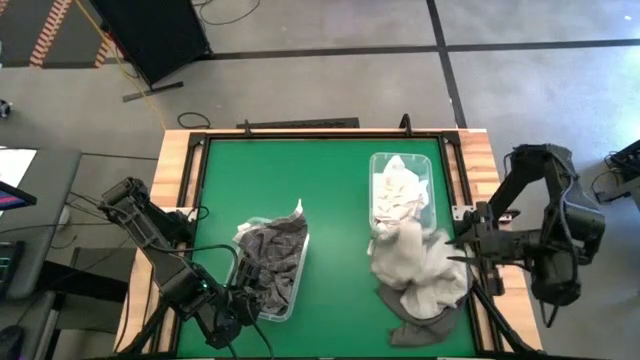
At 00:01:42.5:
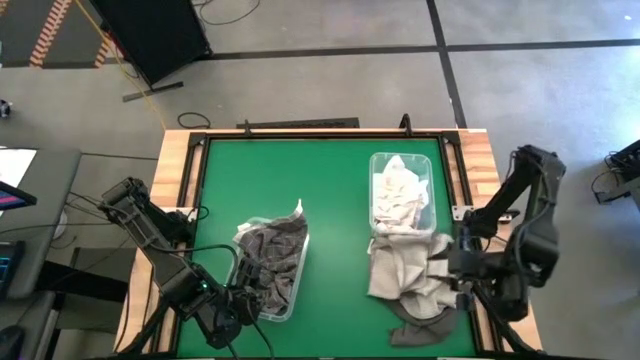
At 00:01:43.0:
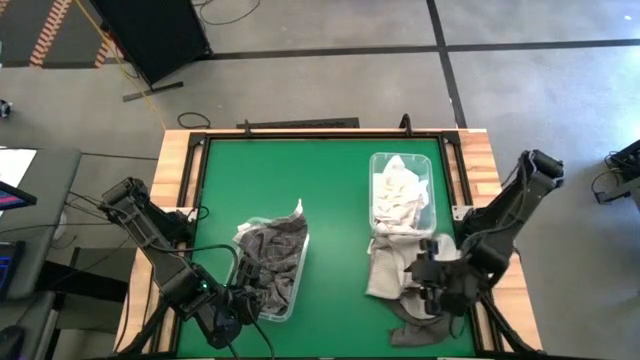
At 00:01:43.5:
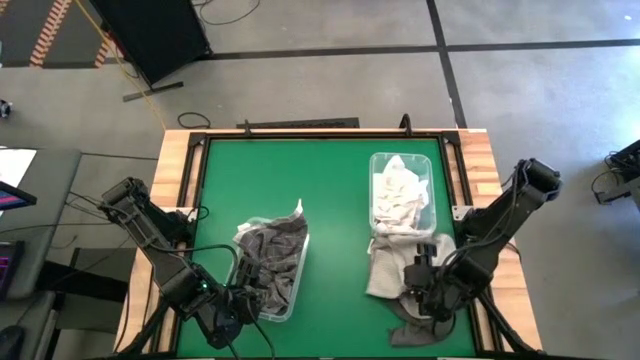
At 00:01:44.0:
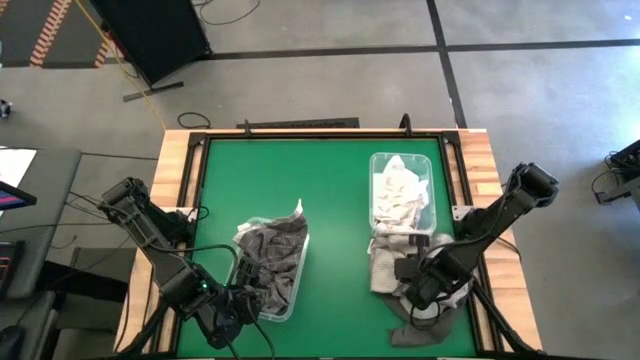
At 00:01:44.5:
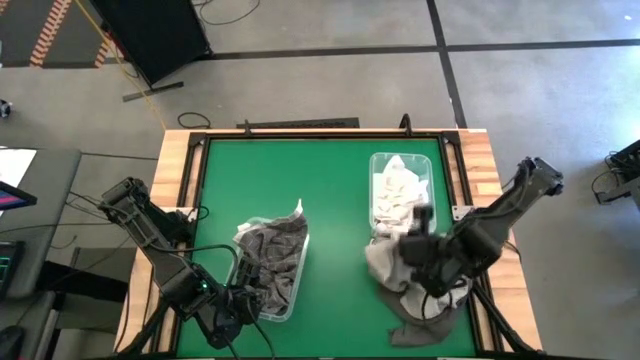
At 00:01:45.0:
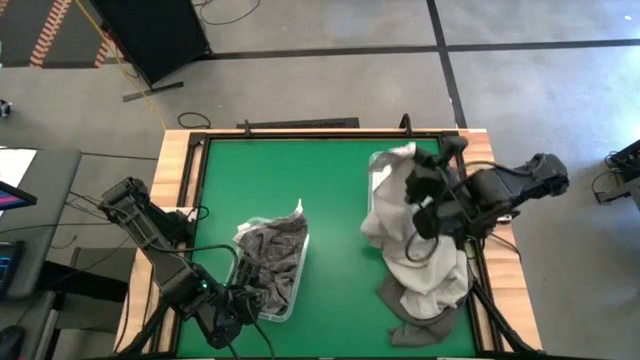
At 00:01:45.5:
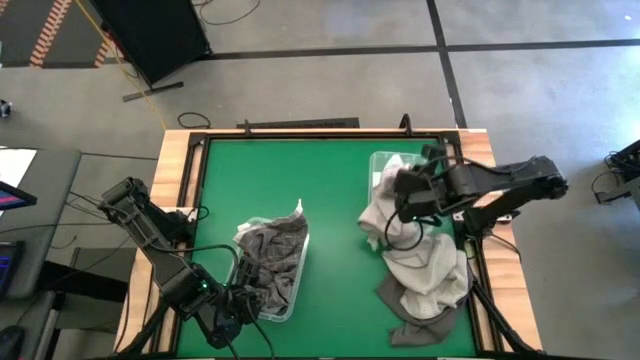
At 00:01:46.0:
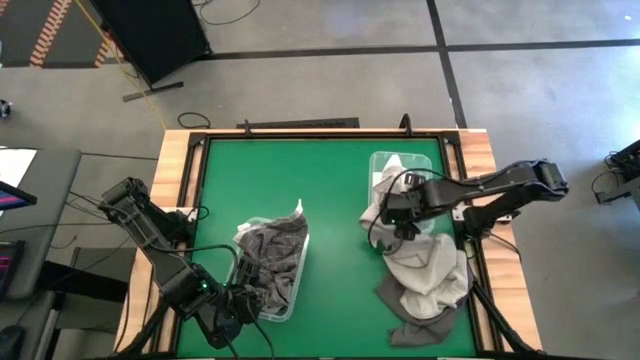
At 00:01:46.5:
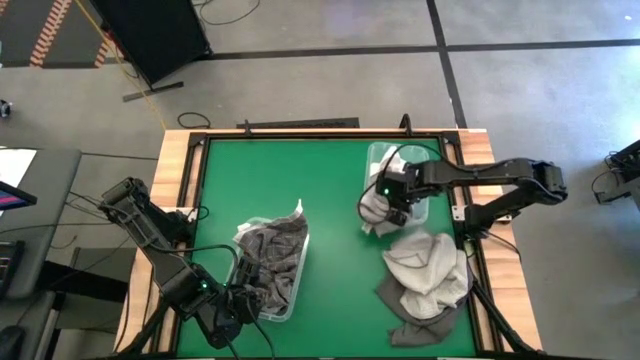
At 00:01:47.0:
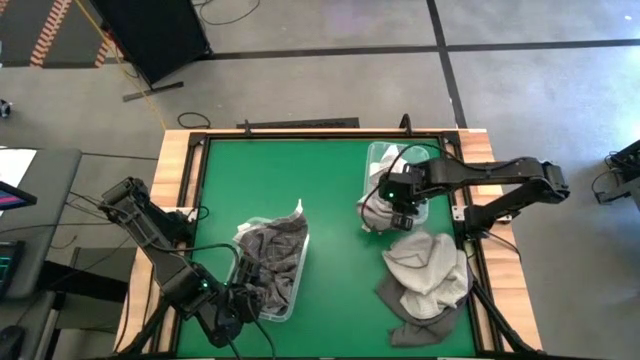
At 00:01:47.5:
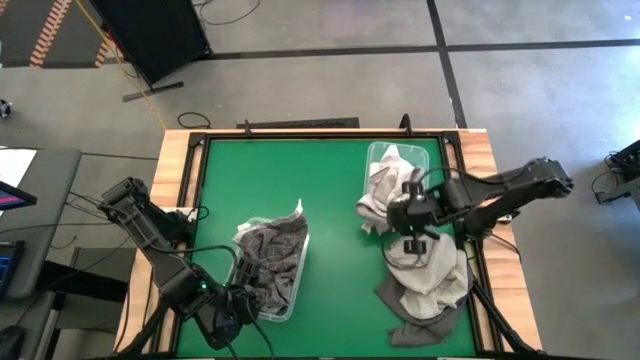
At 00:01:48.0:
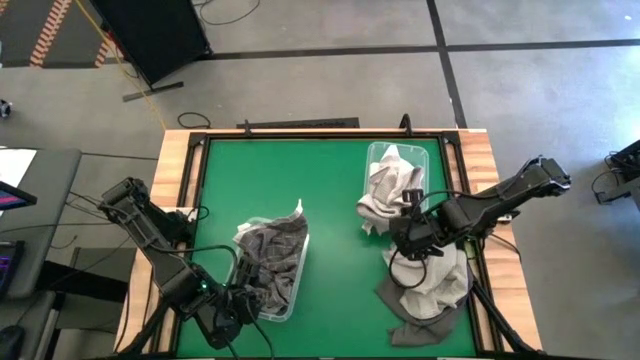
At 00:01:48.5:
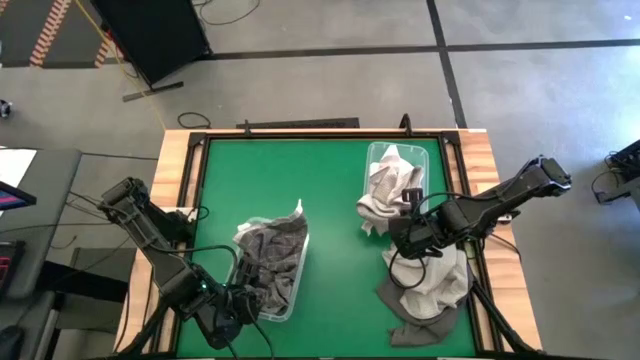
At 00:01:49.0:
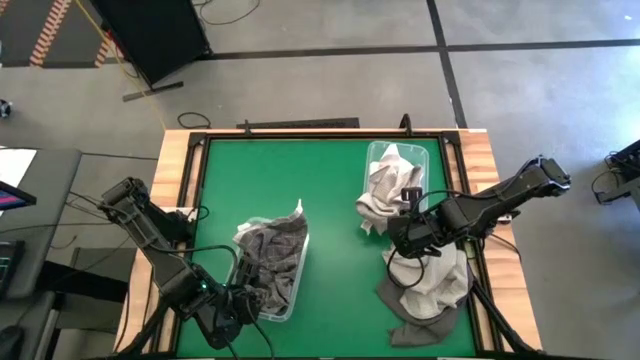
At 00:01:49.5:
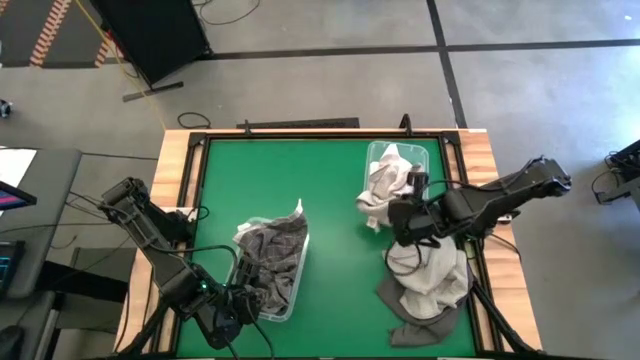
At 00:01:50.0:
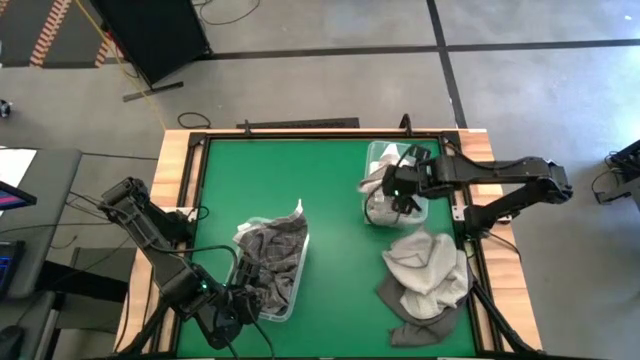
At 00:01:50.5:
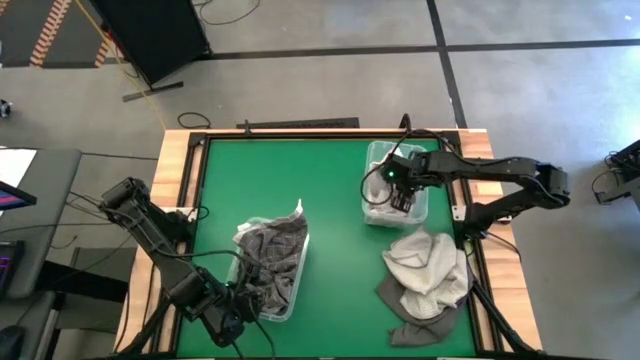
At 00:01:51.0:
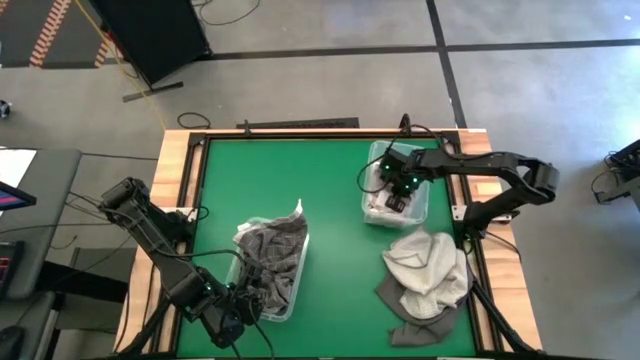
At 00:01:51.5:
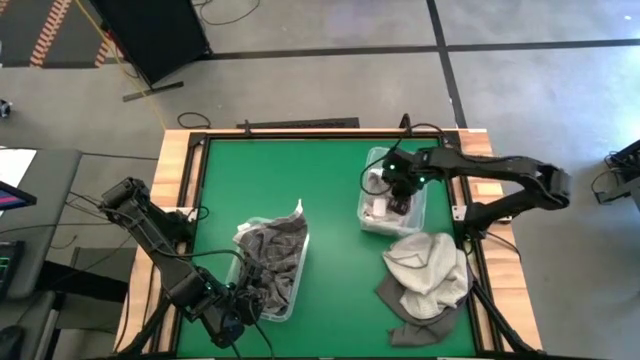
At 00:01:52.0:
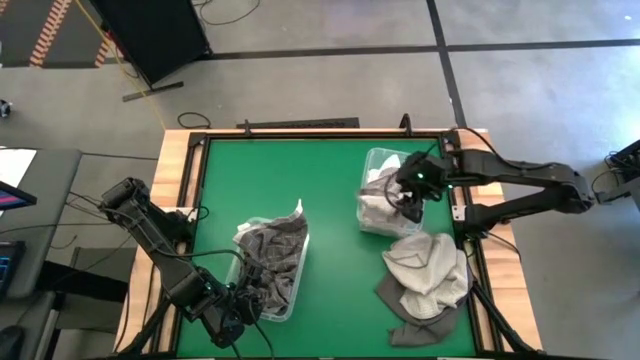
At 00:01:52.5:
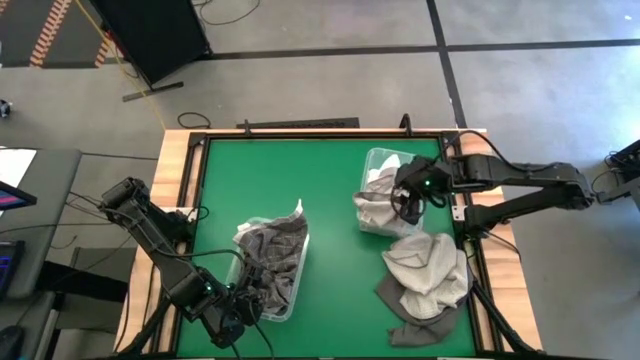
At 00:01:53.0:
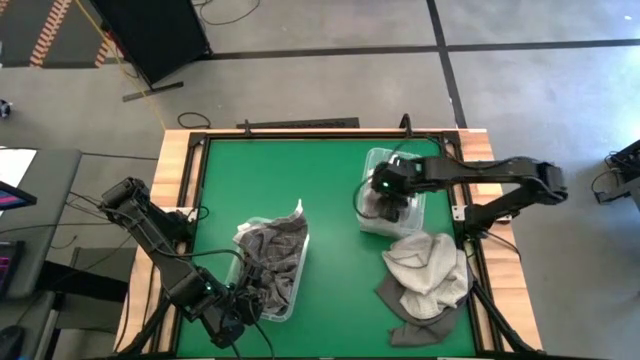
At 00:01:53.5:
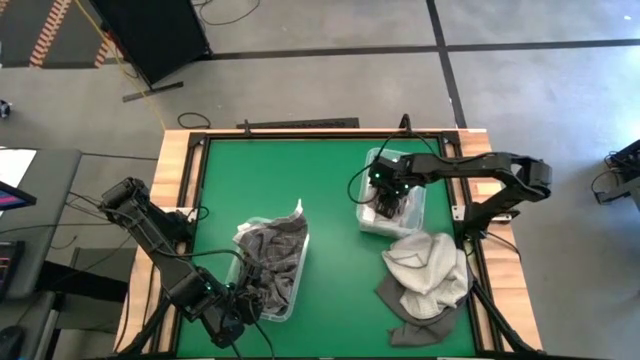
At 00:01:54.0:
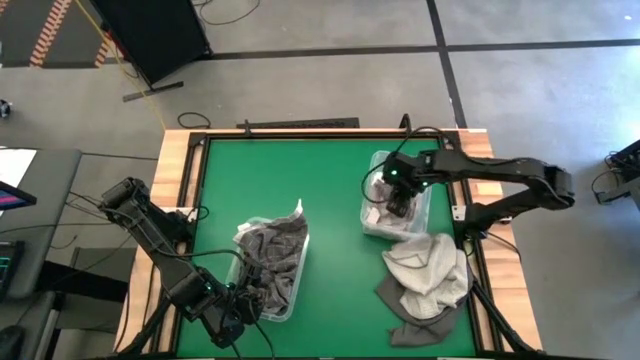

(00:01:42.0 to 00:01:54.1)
Task: Sort towels by color in basket
Put the gray towel into the top transparent bin

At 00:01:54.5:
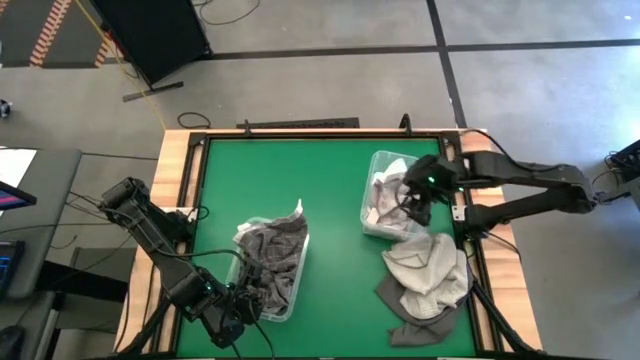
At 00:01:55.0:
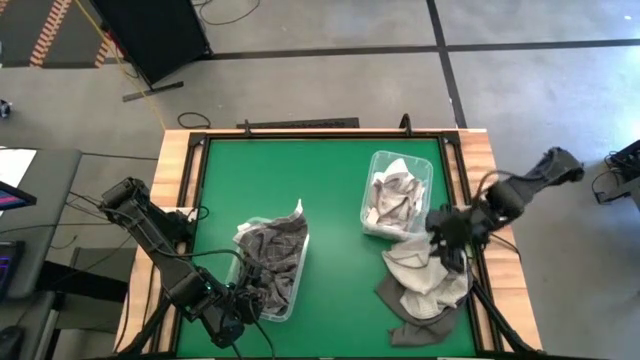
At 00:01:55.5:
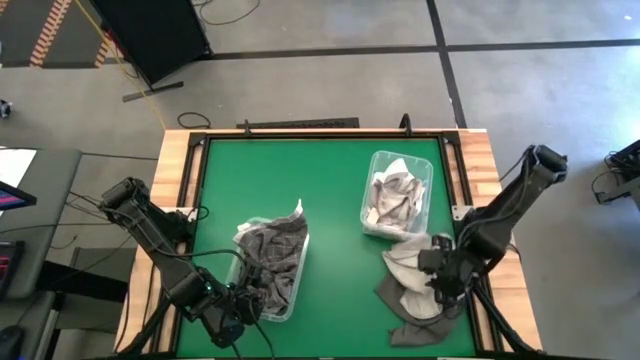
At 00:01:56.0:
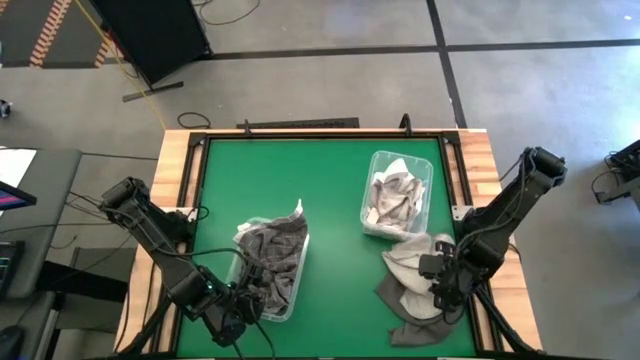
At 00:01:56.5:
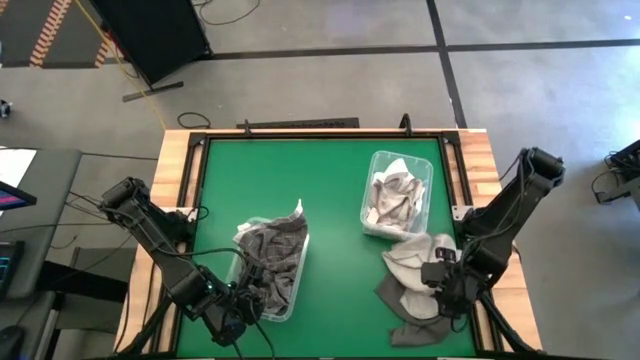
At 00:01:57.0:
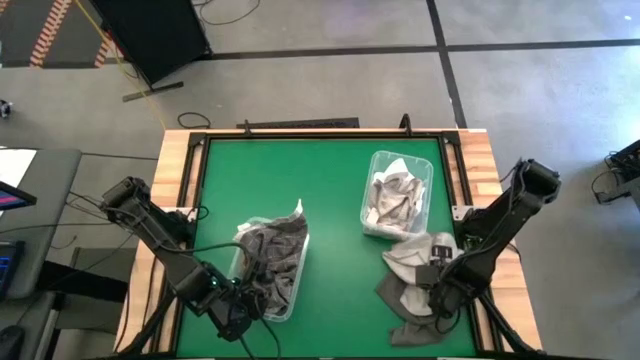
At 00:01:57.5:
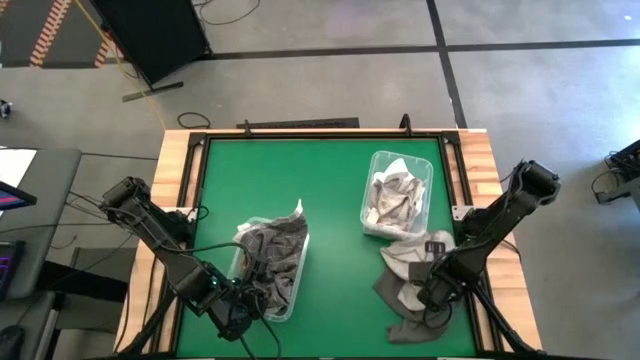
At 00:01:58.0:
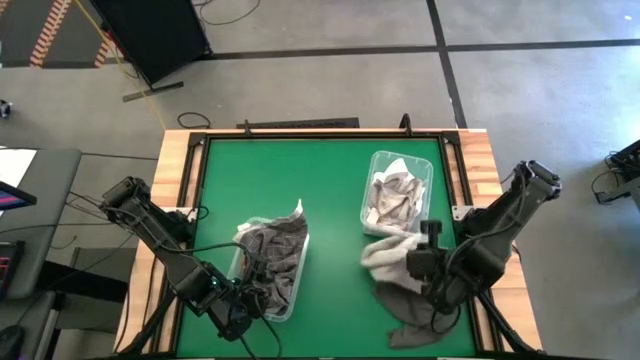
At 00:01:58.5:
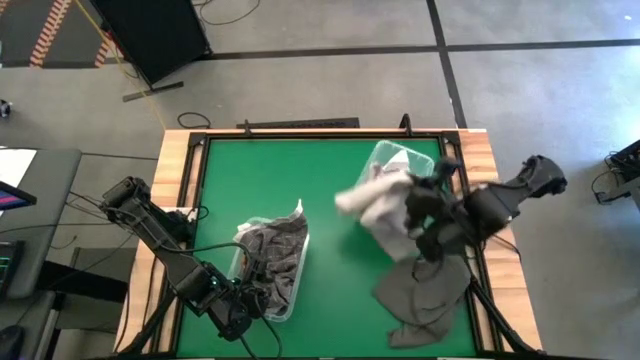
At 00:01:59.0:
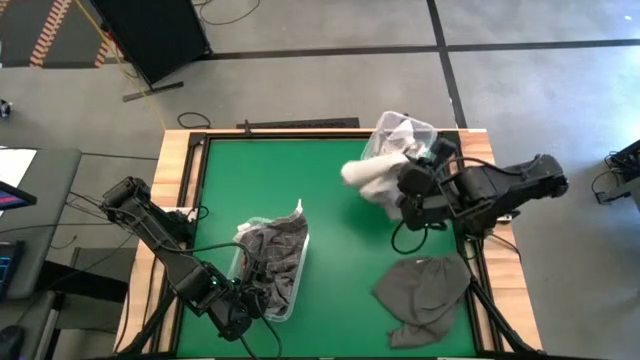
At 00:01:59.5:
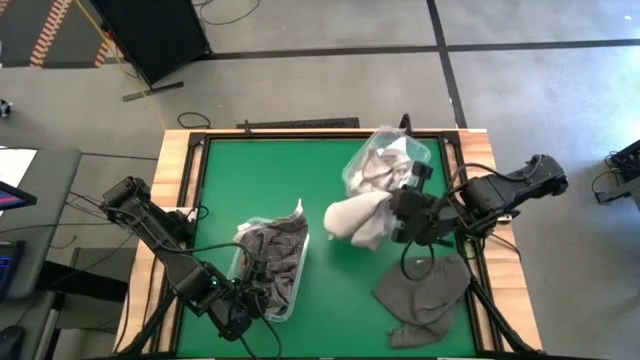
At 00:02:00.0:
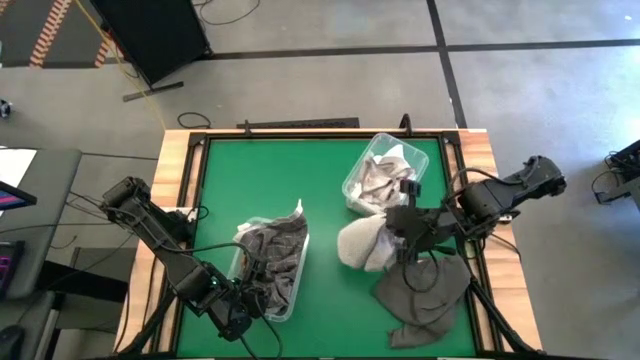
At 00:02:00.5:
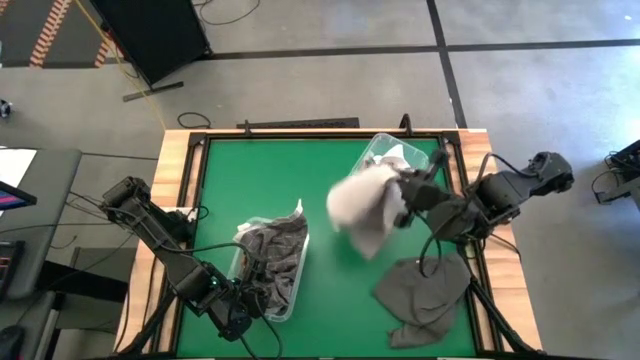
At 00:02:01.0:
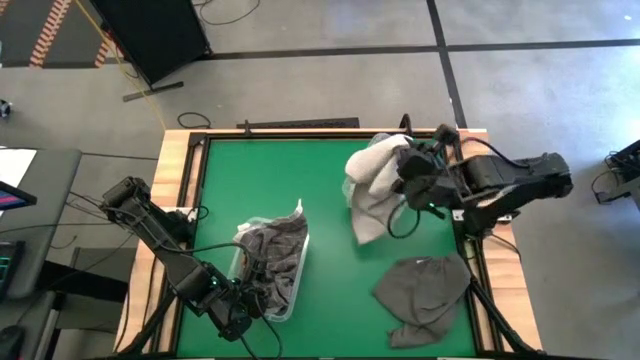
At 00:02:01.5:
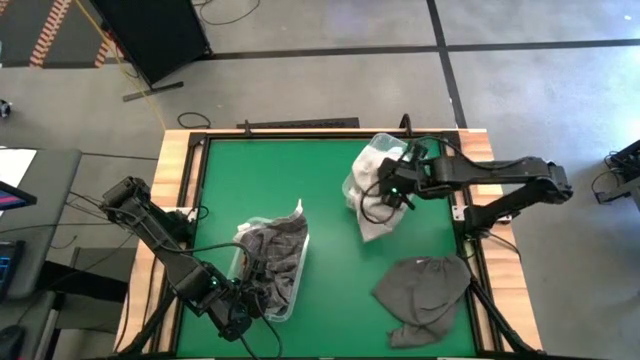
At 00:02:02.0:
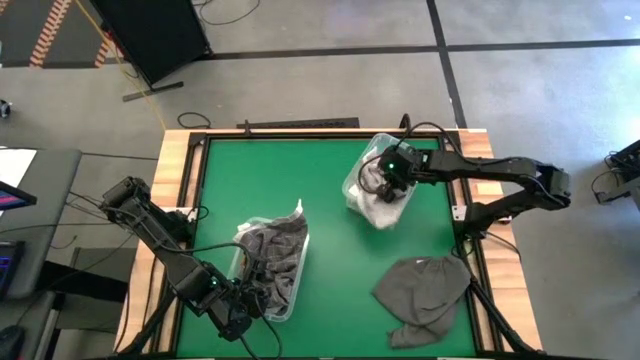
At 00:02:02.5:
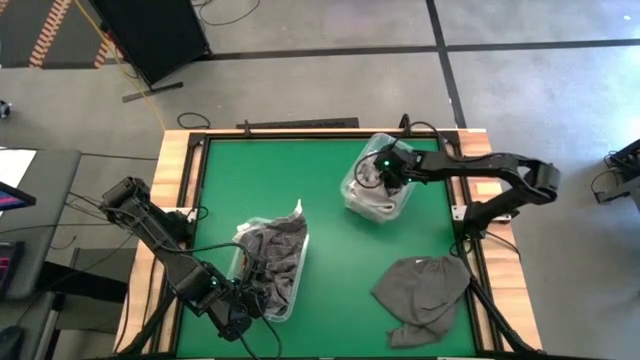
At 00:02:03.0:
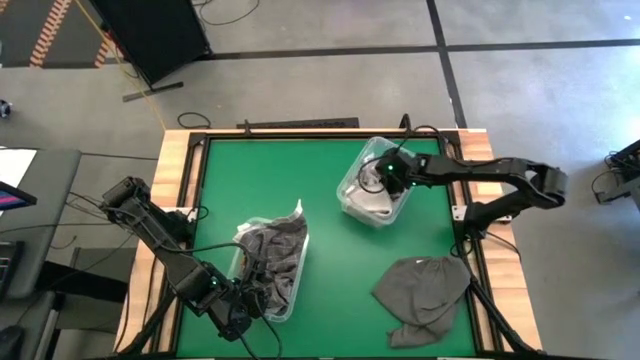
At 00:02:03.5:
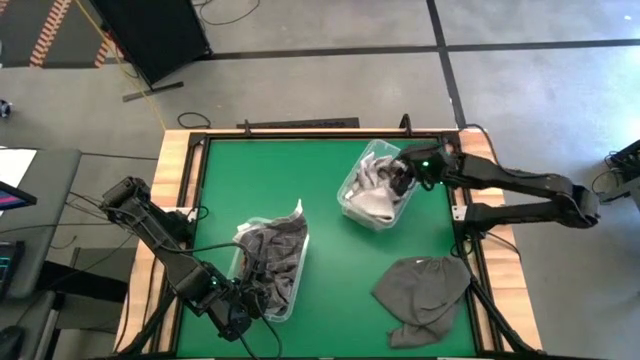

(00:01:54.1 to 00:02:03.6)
Put the gray towel into the top transparent bin
